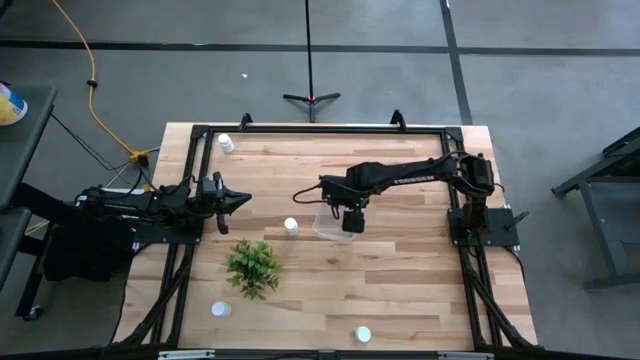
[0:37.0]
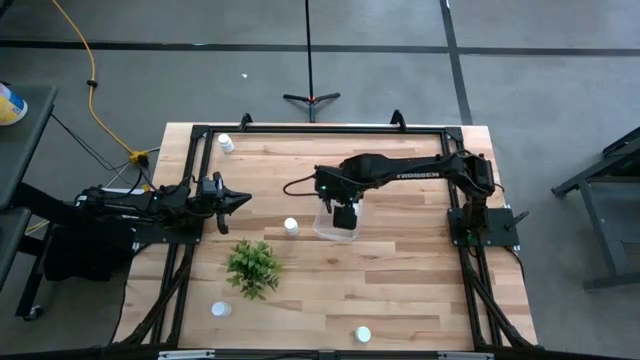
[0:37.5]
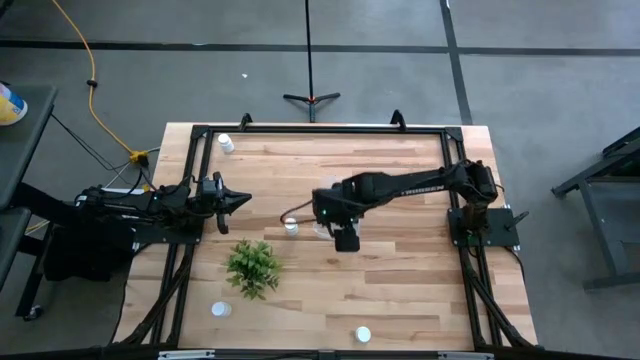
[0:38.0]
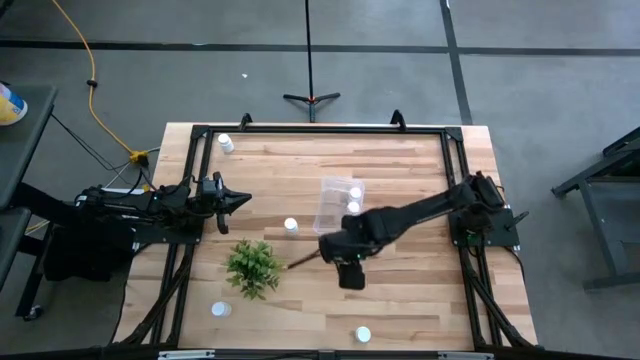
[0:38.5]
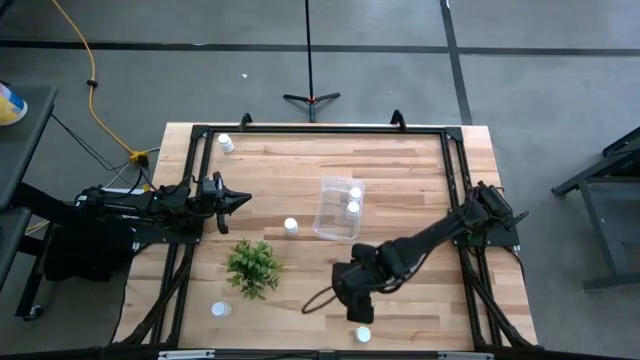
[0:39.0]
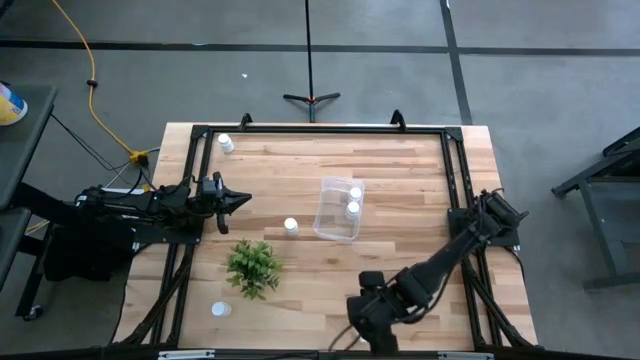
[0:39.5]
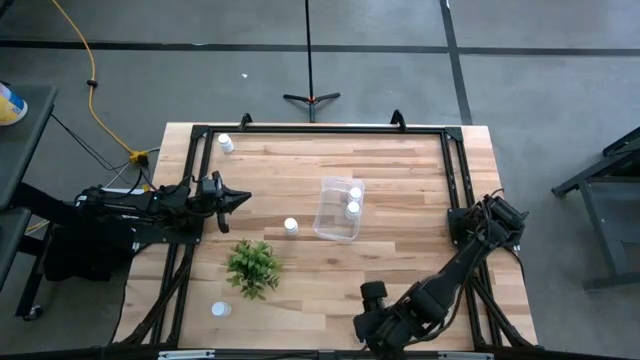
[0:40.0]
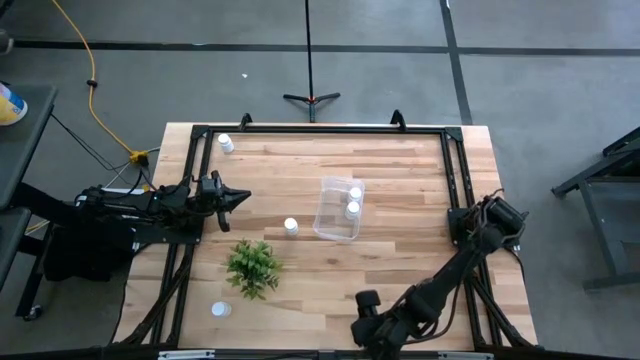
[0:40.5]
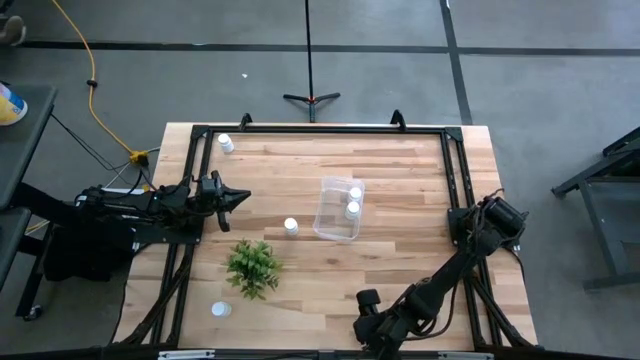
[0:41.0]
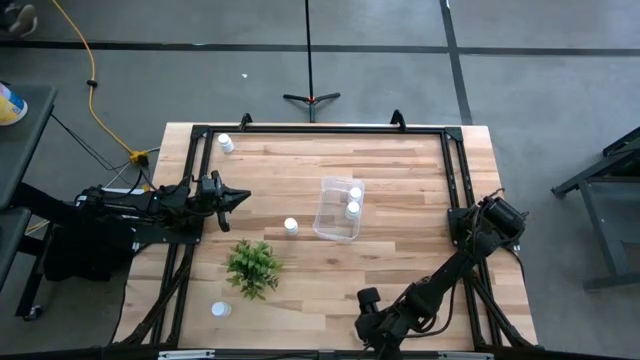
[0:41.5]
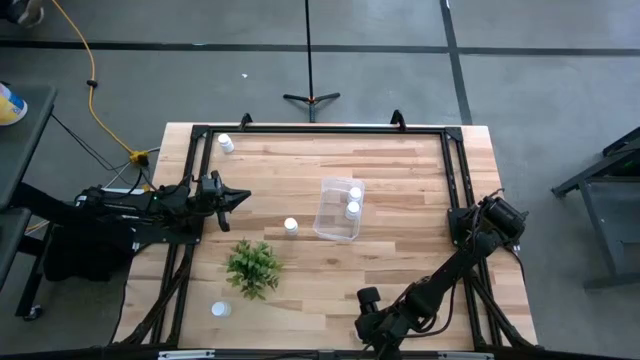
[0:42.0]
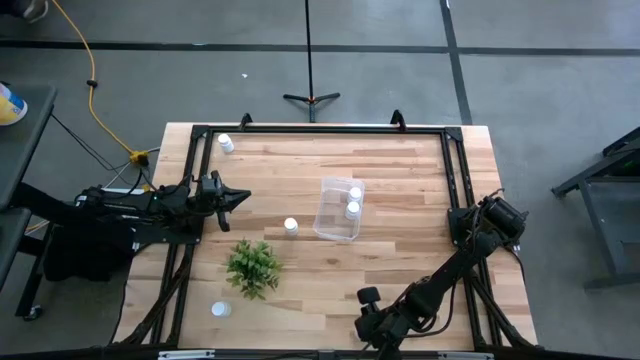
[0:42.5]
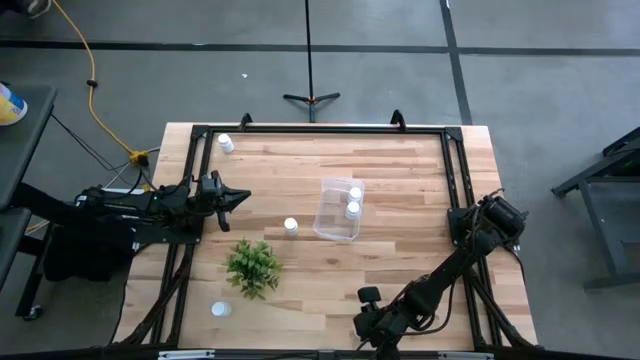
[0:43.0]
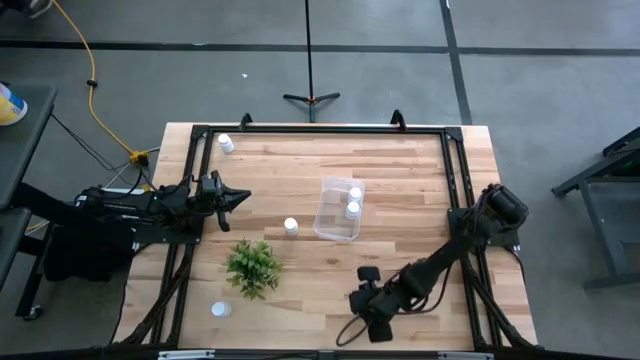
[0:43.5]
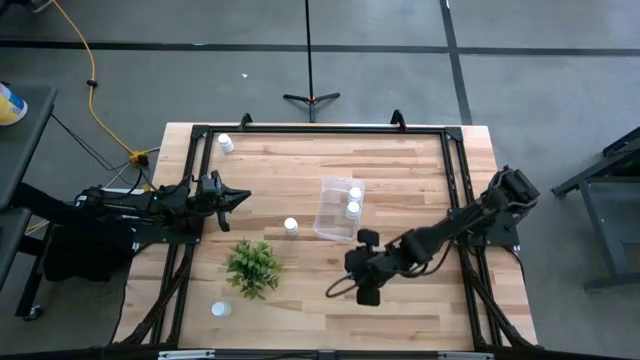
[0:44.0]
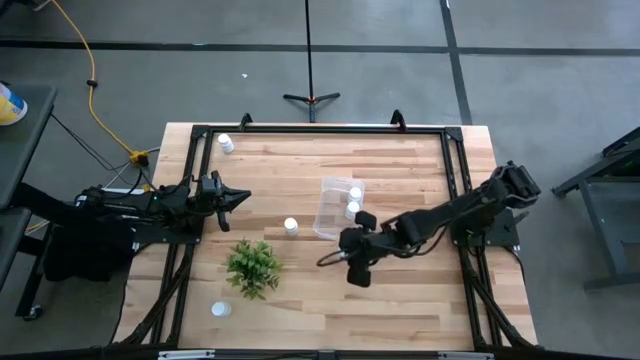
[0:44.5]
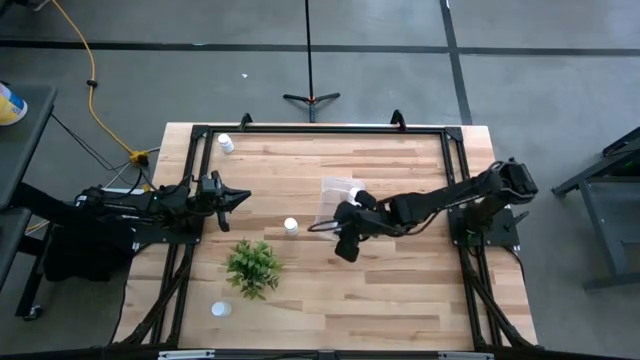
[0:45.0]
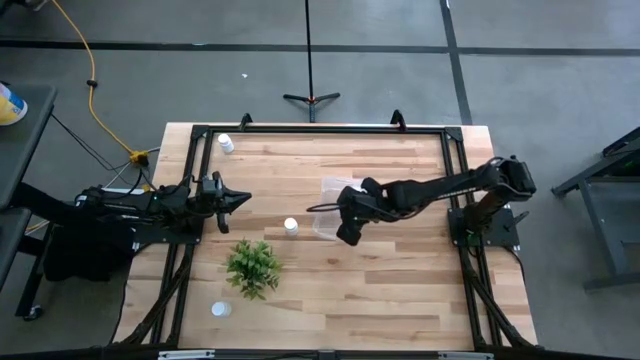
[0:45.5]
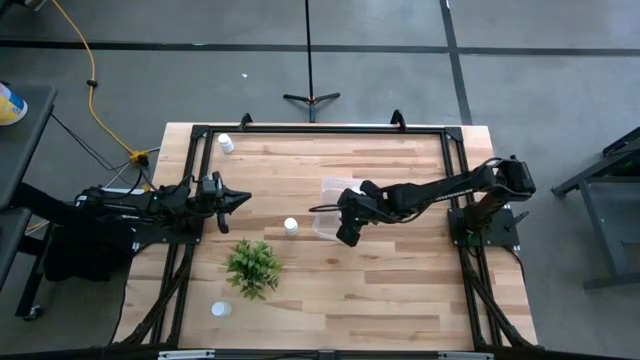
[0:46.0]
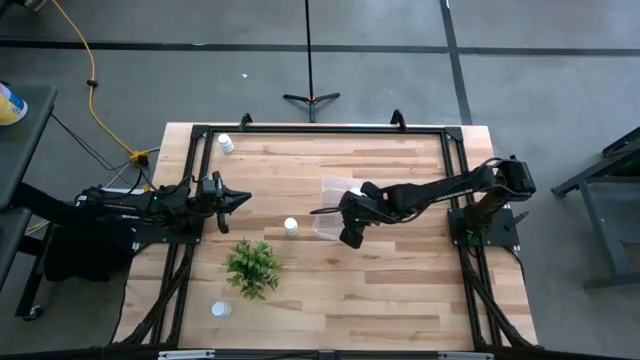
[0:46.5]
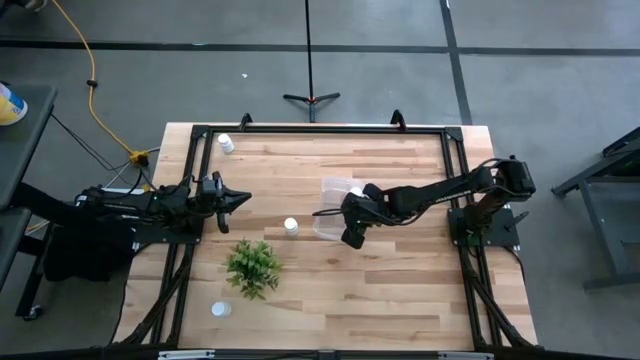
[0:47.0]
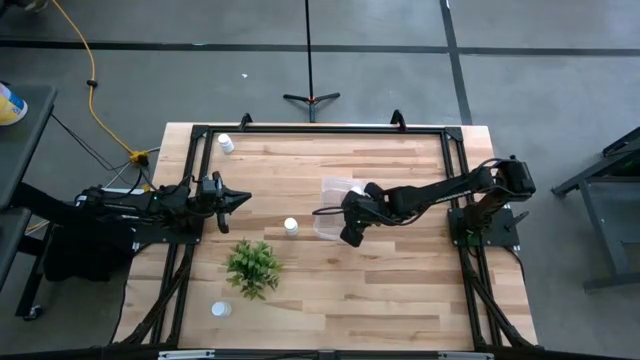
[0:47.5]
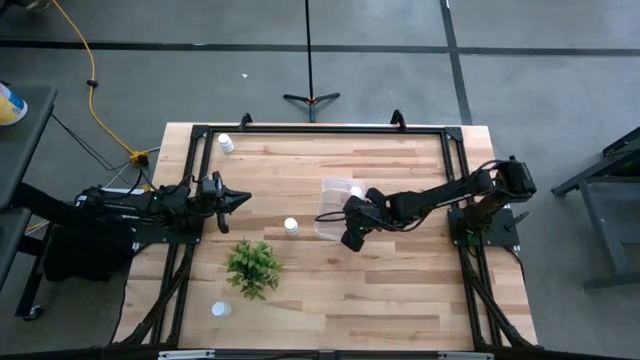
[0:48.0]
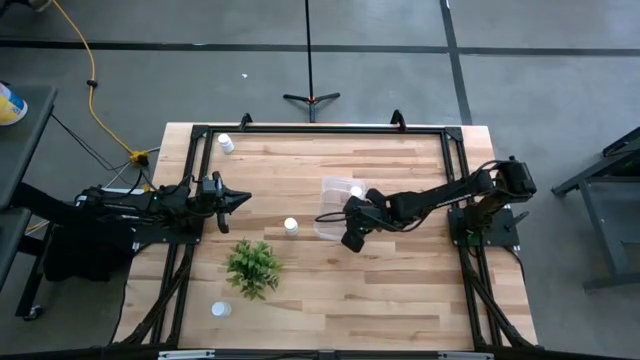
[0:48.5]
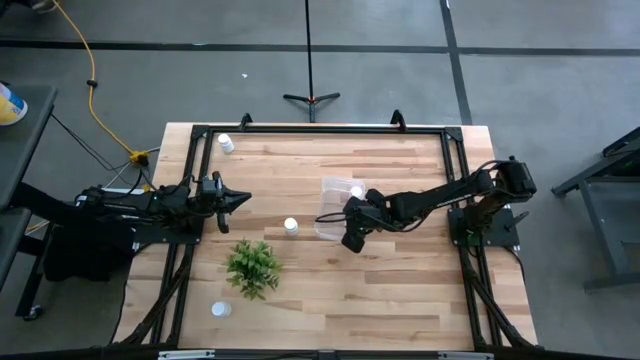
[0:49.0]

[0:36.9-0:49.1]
Task: Pick and place pill bottles into a basket
Put the white medicine bottle into the transparent bin

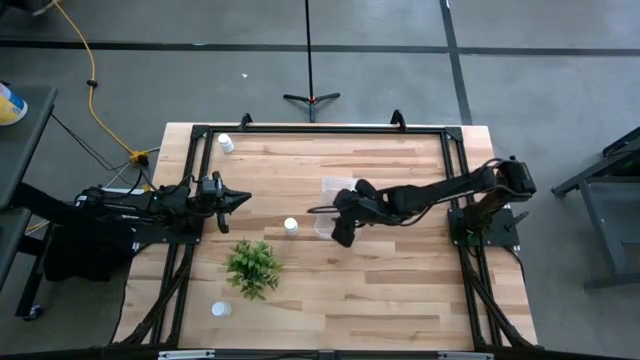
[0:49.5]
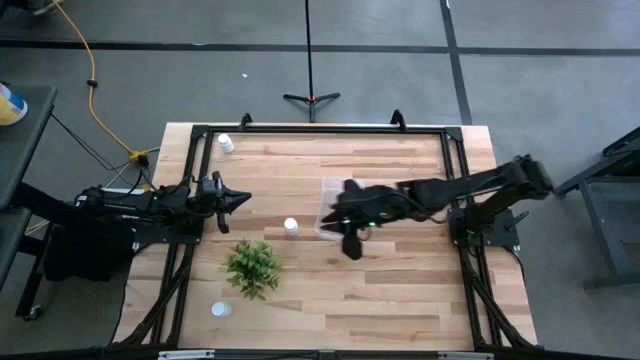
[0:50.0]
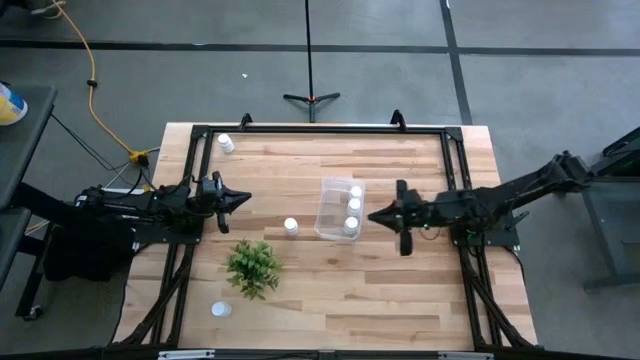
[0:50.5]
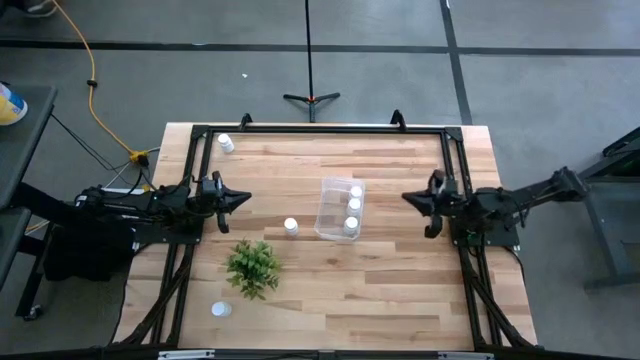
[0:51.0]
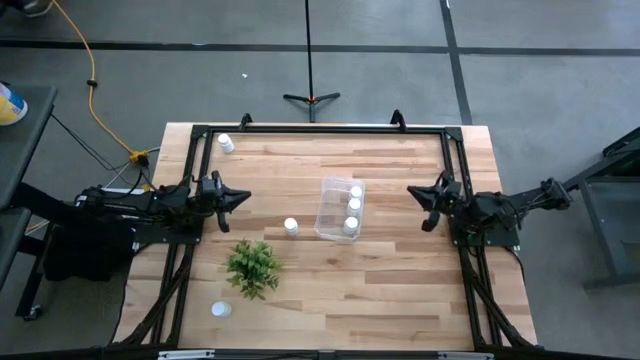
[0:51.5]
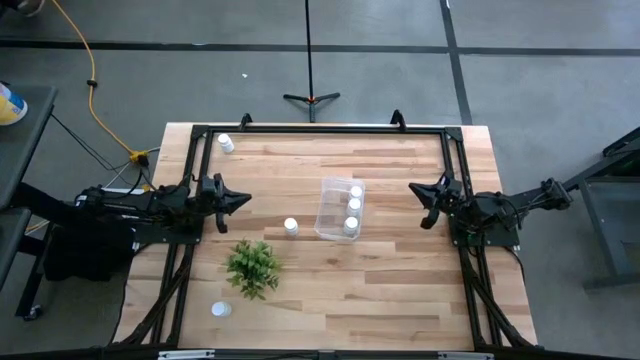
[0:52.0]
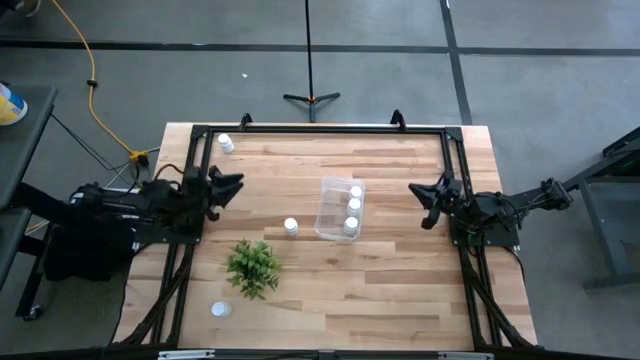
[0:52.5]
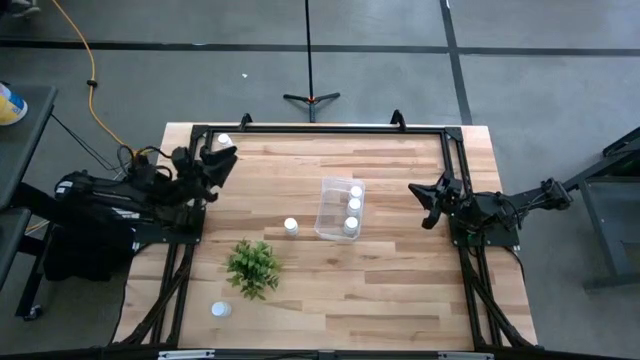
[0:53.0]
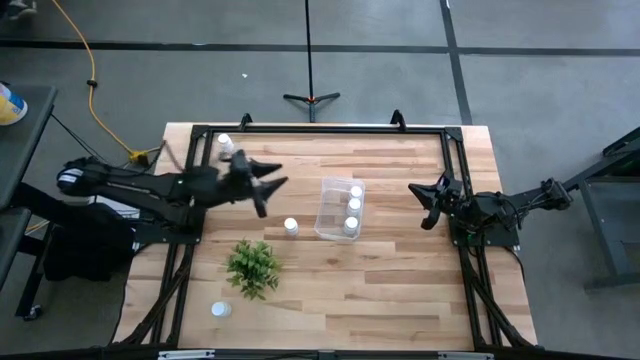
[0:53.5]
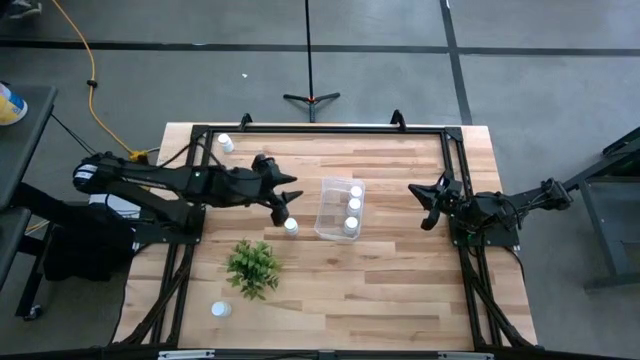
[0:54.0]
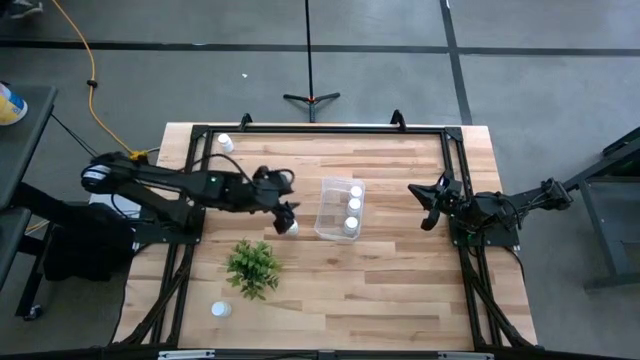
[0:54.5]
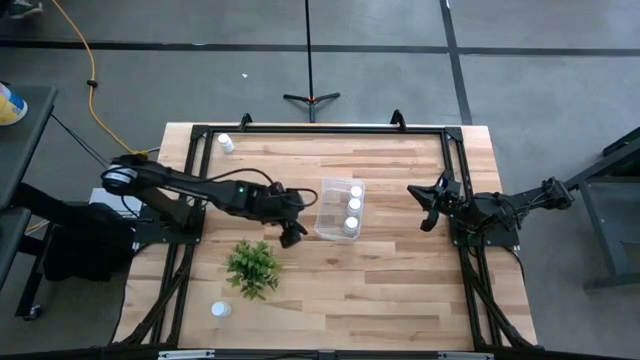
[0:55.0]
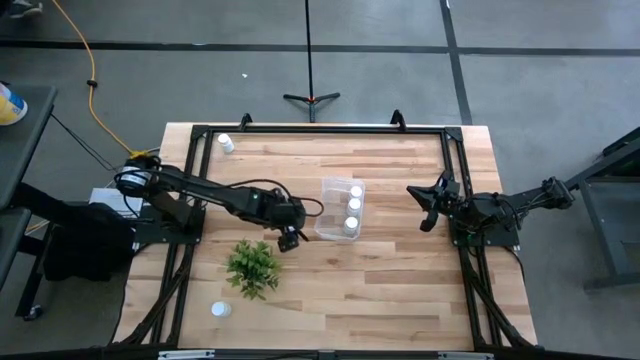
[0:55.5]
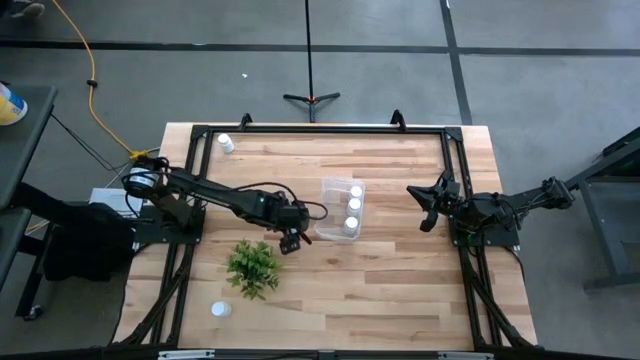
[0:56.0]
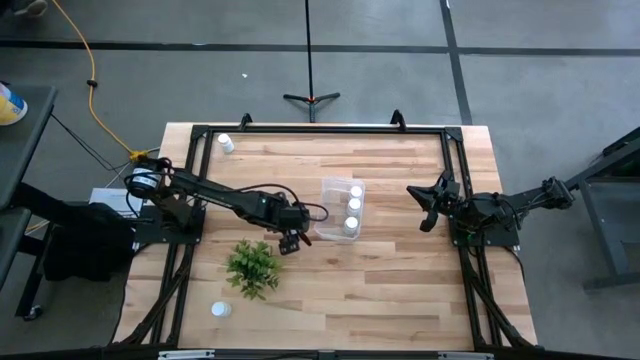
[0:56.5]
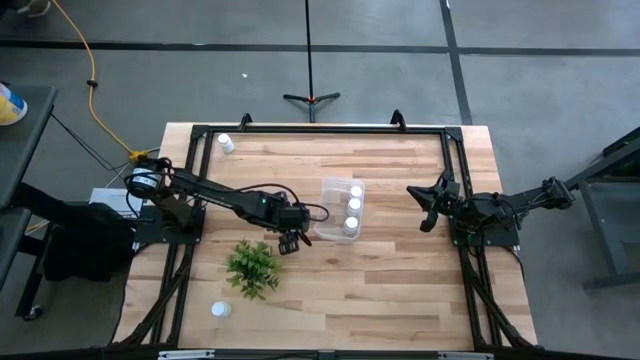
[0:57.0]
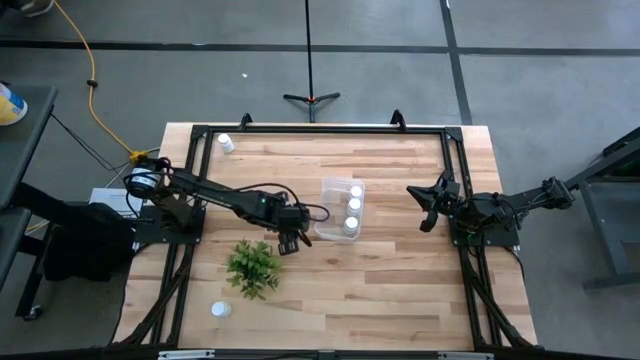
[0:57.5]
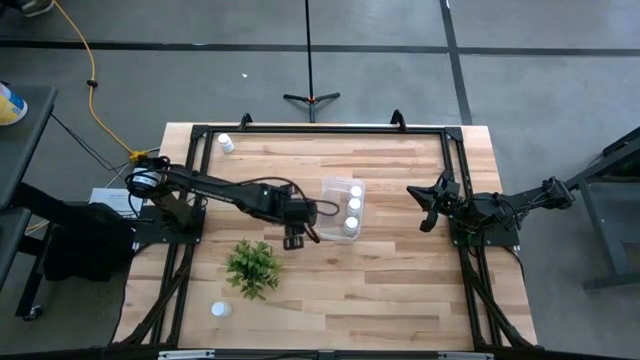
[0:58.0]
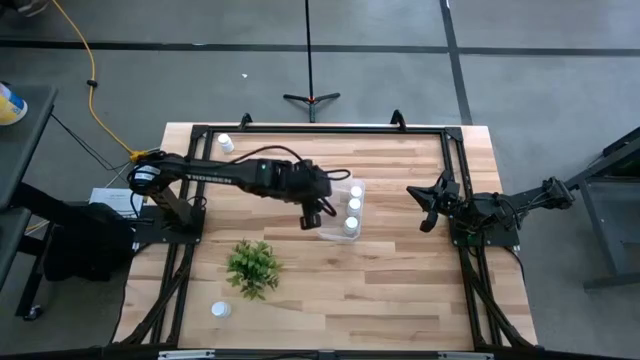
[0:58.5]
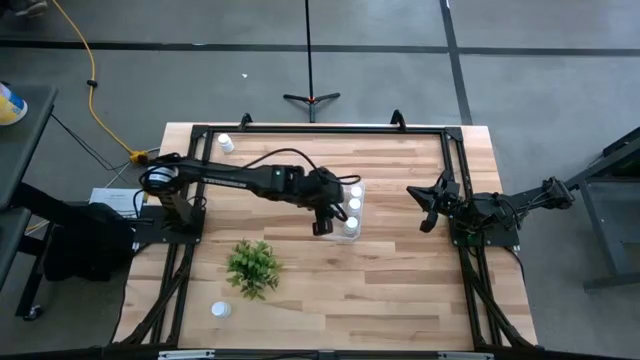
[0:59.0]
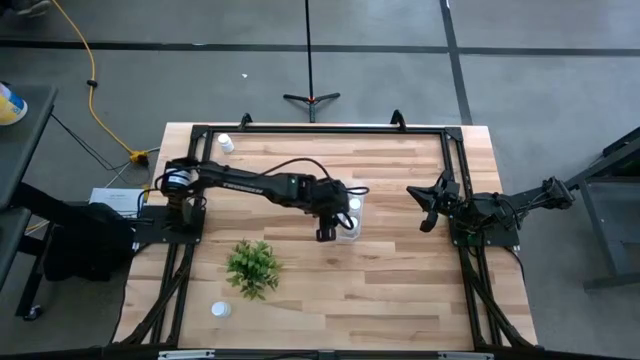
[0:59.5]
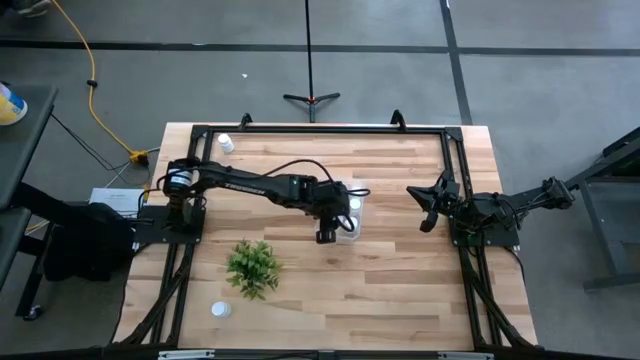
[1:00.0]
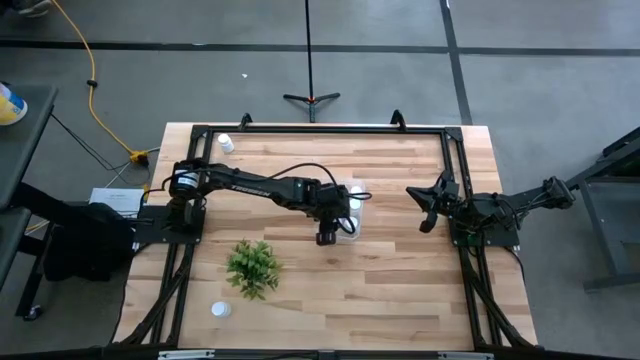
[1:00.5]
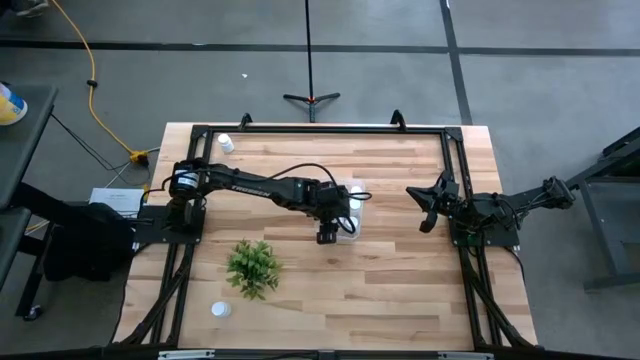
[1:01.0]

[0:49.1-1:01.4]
Put the white medicine bottle into the transparent bin
